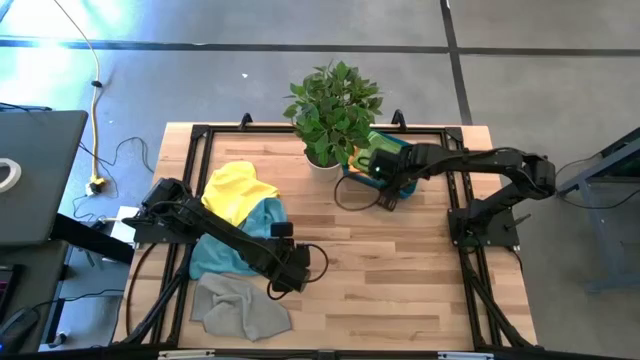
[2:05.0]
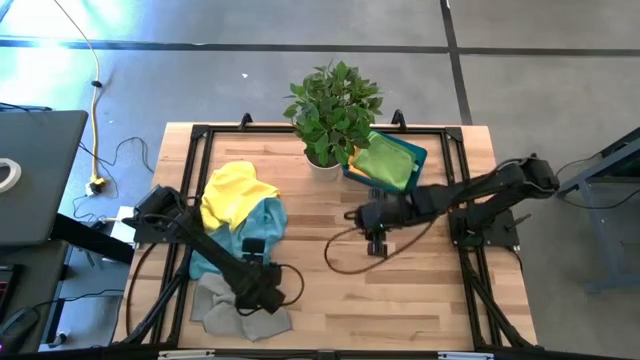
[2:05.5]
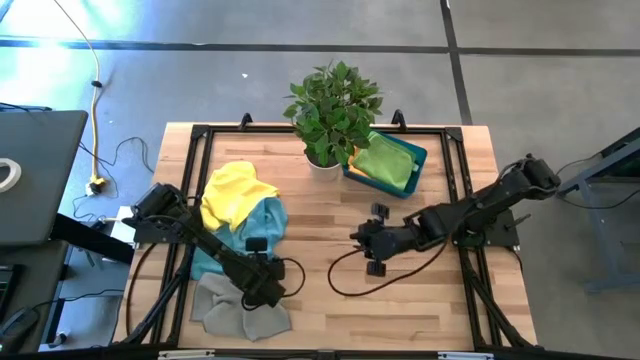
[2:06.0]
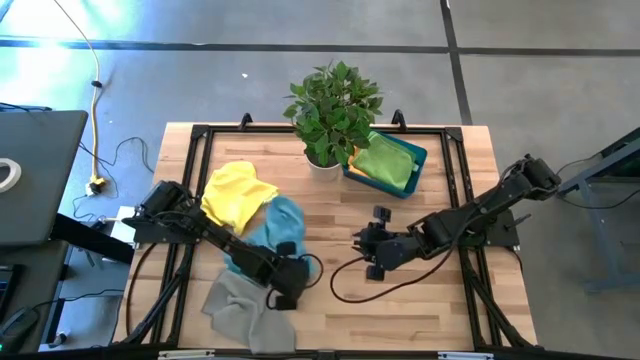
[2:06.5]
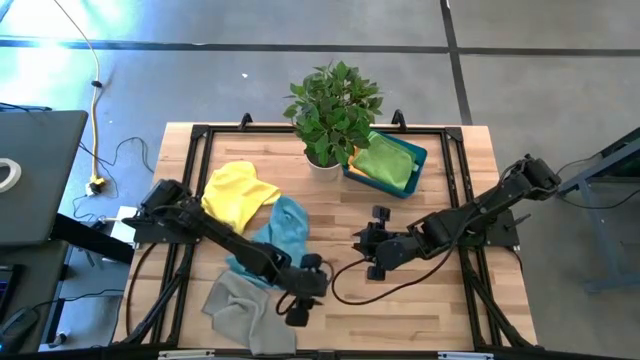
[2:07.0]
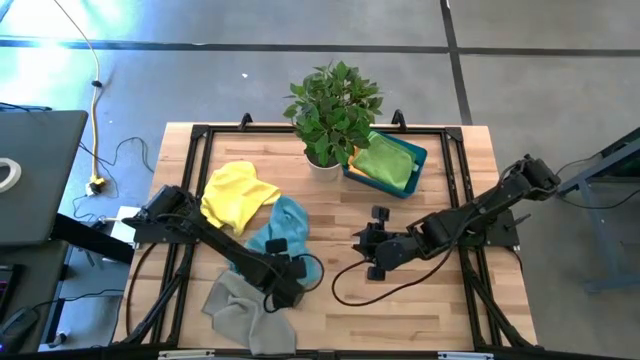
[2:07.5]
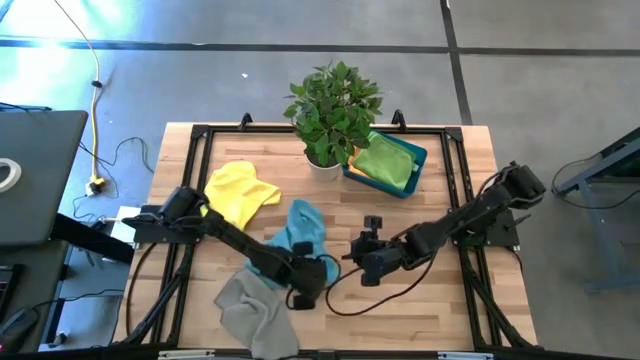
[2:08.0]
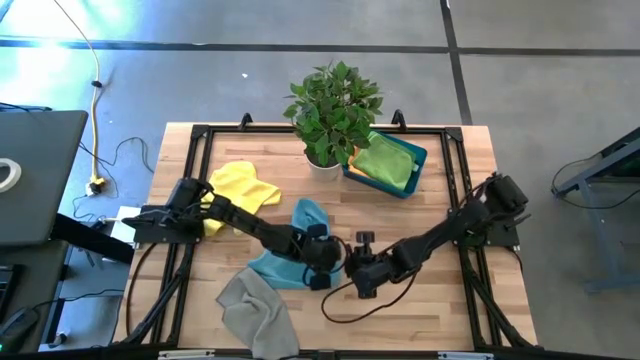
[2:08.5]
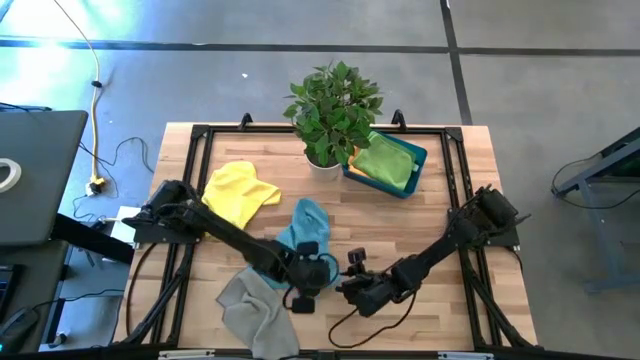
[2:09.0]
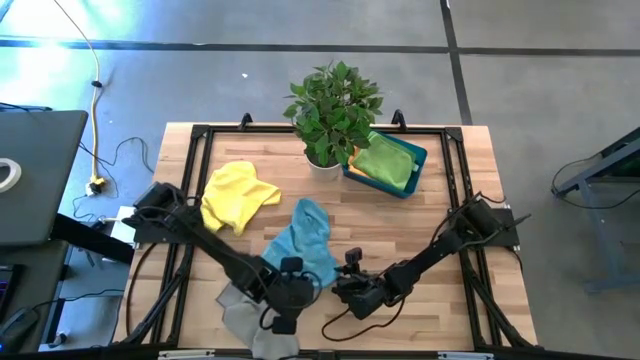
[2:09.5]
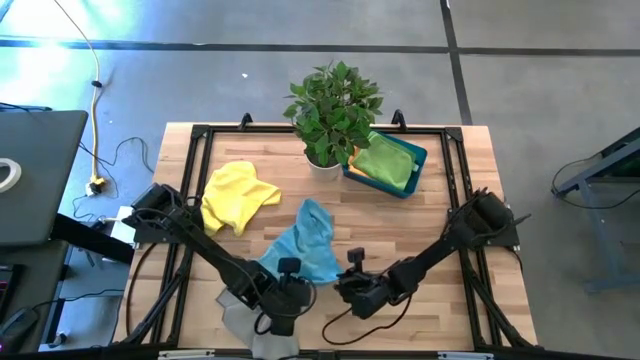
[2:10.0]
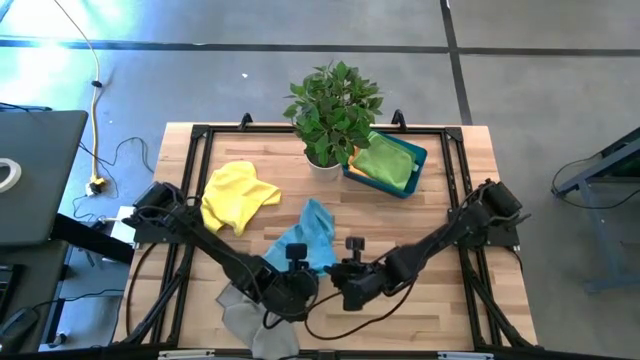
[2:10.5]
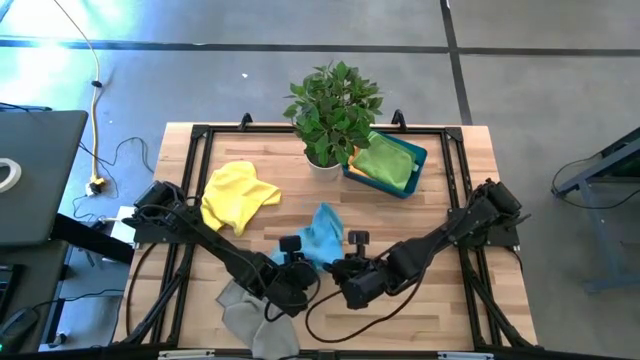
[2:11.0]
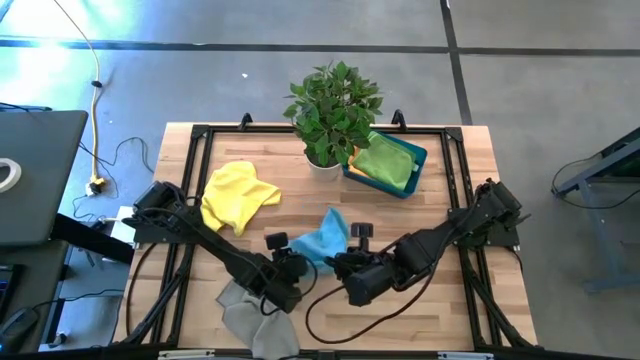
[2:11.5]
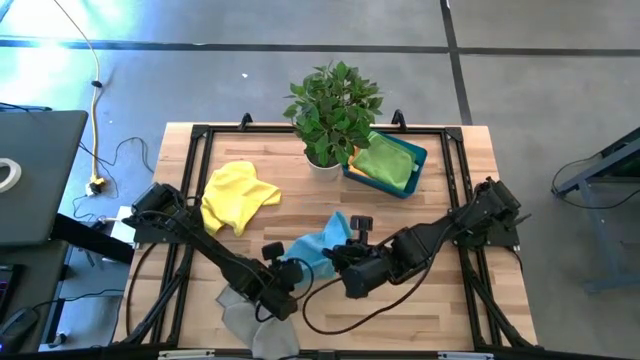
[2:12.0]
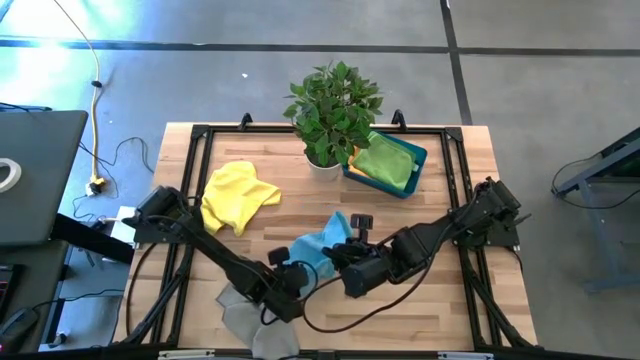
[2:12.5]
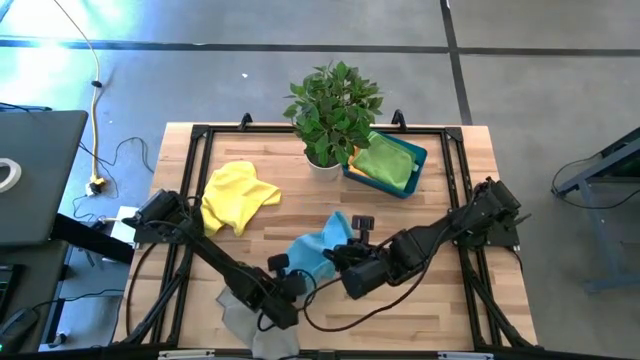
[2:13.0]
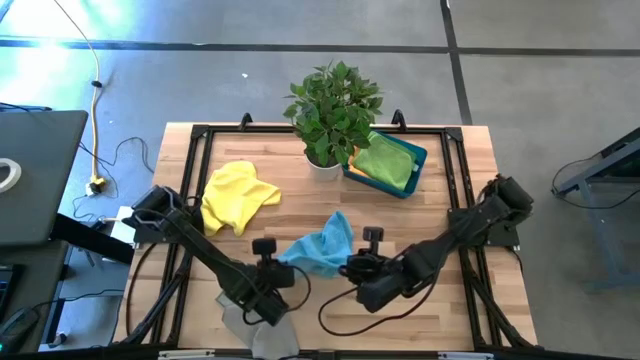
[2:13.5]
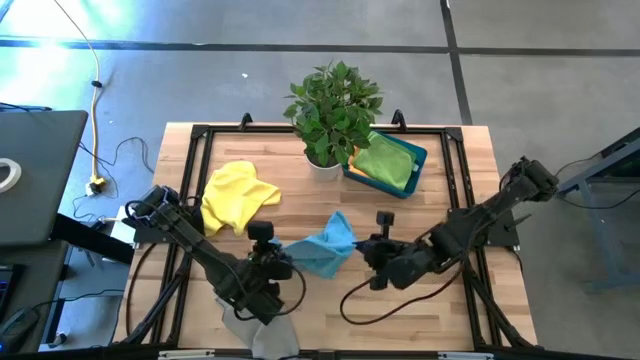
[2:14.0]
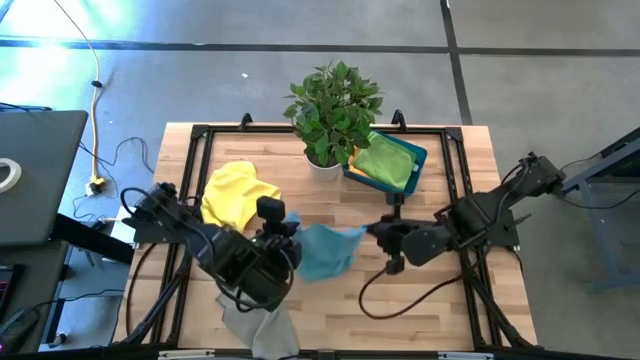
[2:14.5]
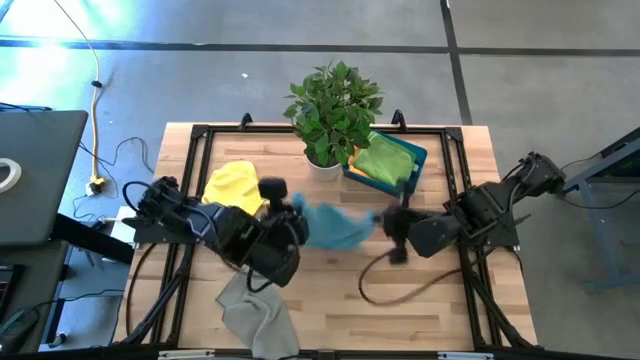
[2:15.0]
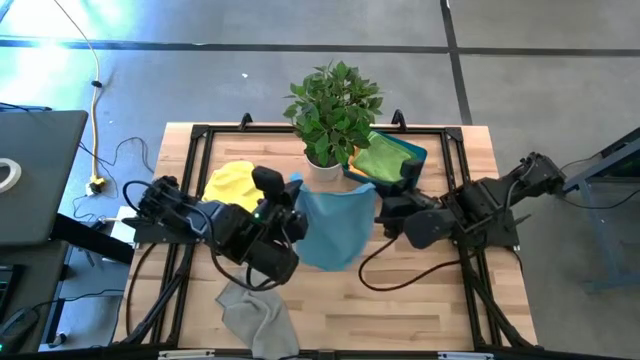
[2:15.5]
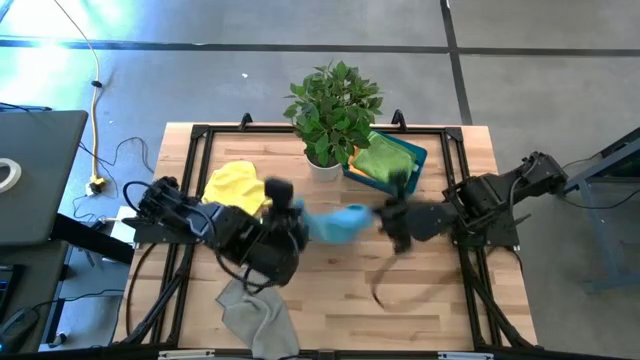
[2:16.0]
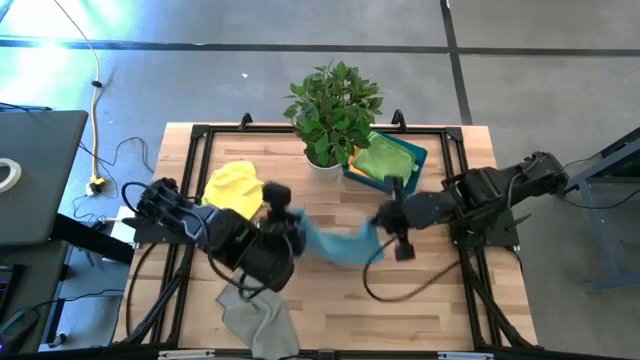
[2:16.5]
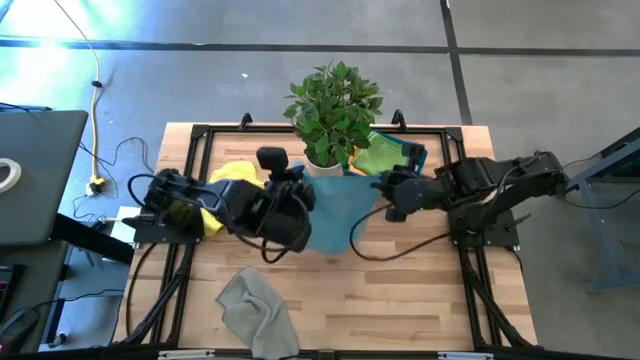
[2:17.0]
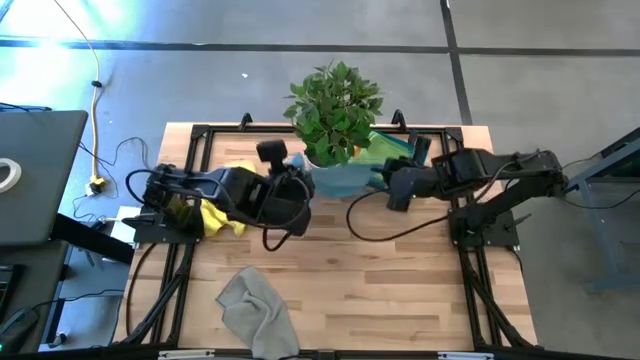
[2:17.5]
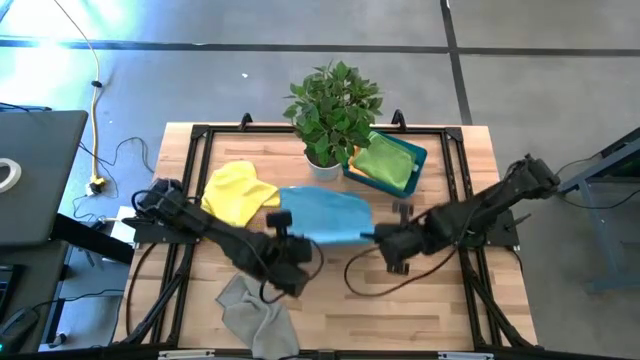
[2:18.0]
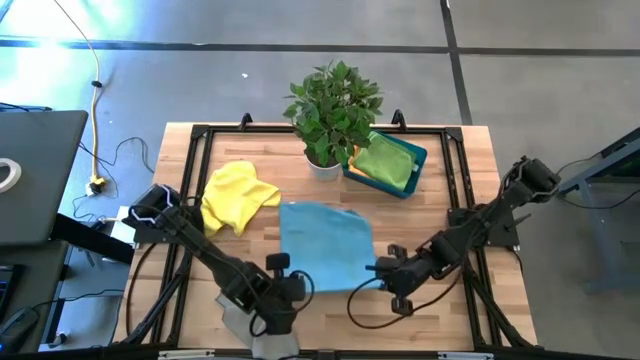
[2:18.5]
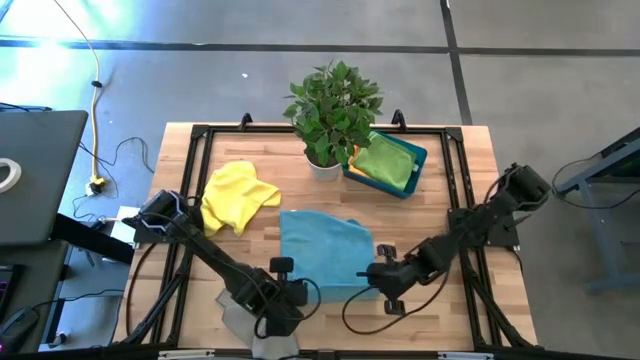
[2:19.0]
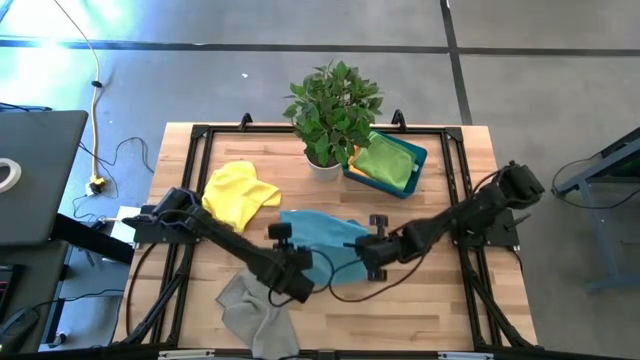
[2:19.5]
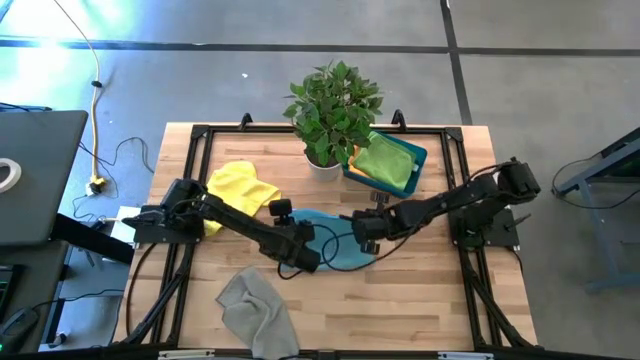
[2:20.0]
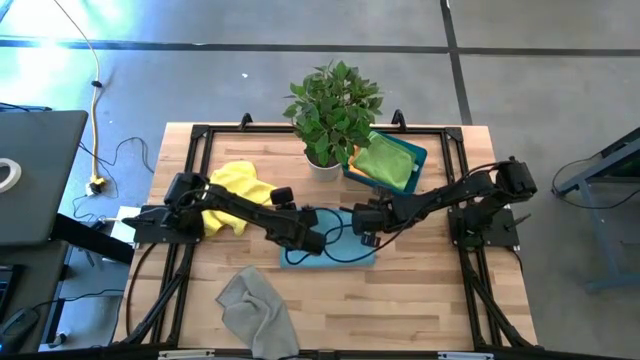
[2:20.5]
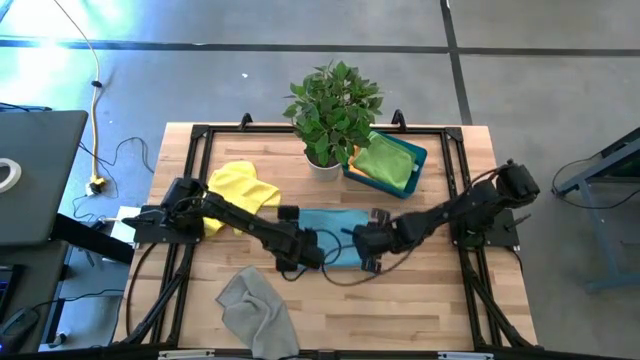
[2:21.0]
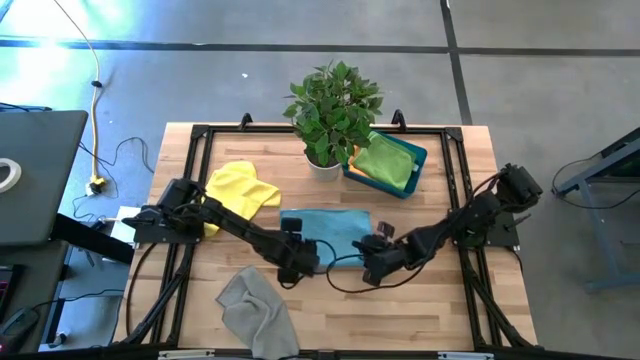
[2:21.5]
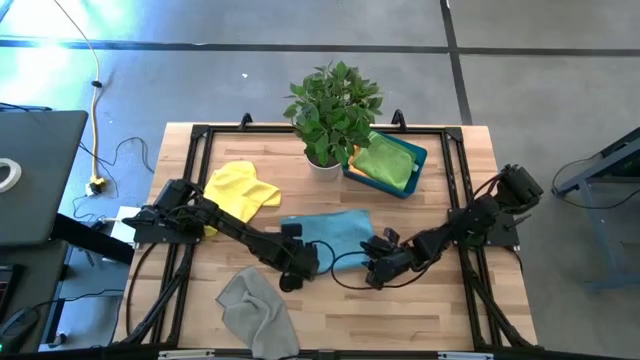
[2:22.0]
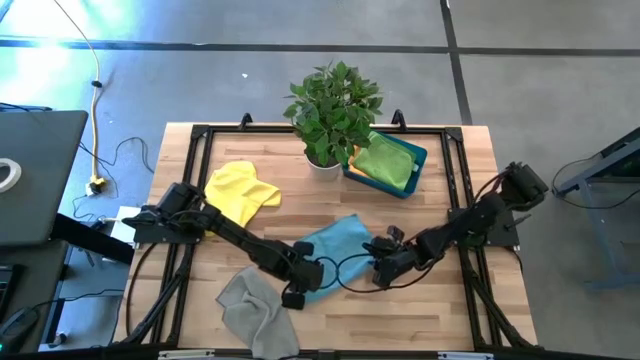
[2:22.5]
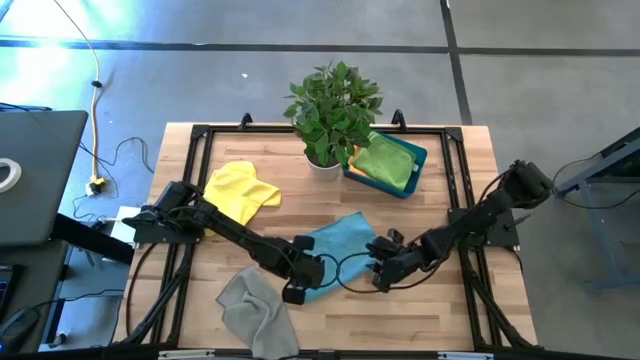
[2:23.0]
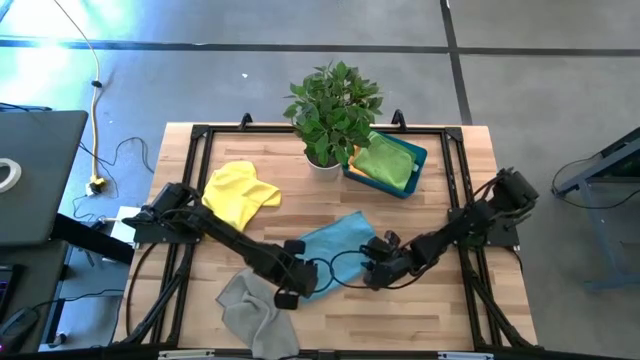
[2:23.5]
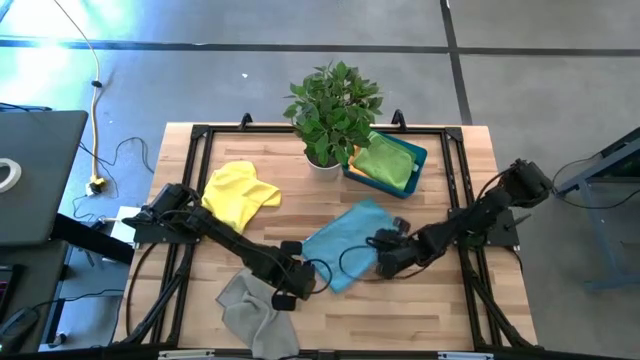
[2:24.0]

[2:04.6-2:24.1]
Task: Fold microfiber towels
Fold the blue towel

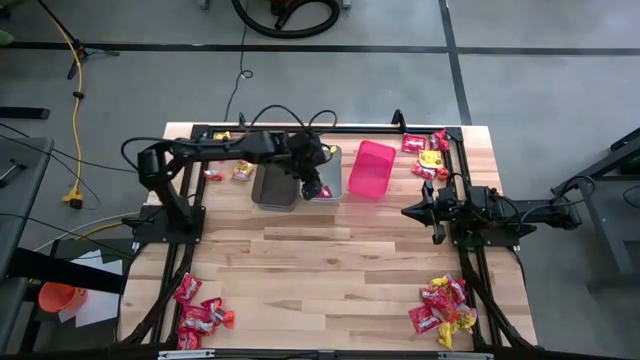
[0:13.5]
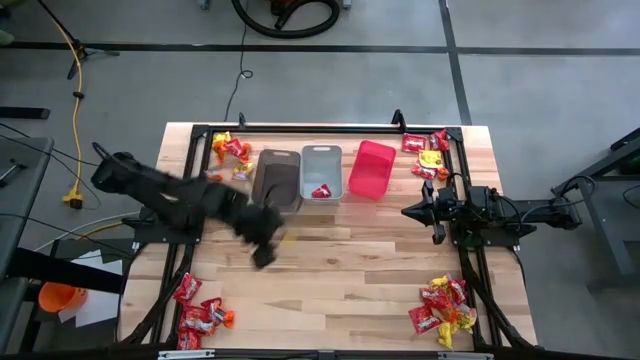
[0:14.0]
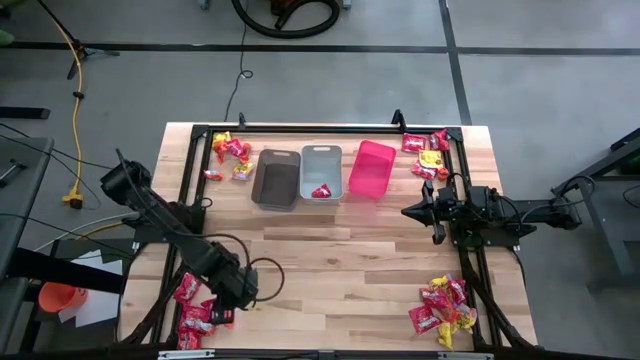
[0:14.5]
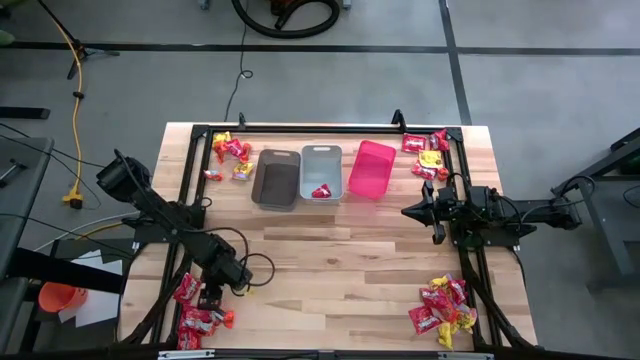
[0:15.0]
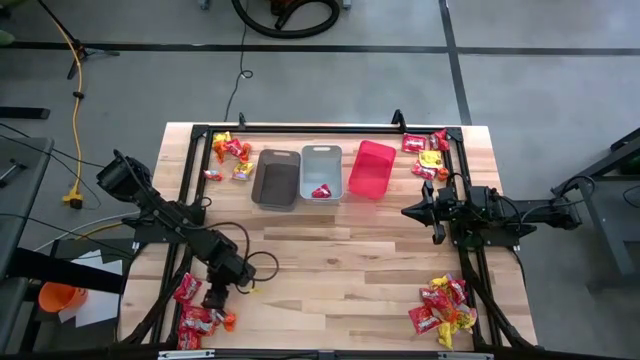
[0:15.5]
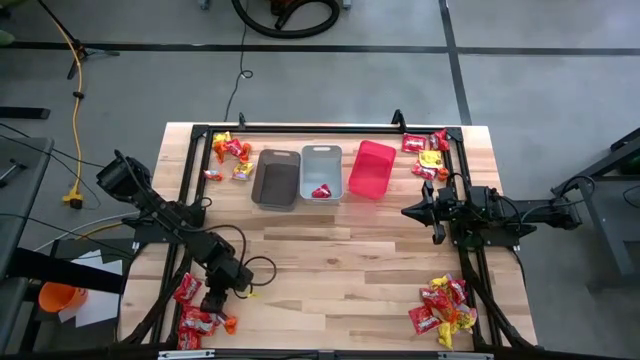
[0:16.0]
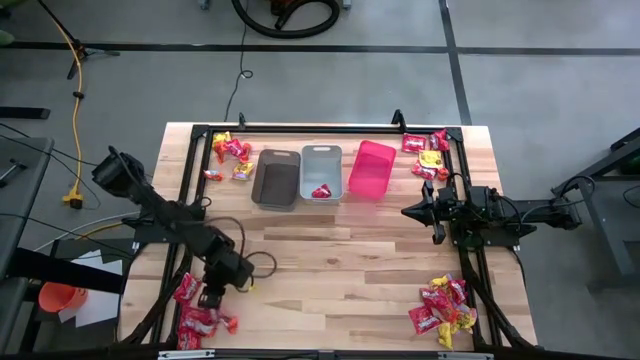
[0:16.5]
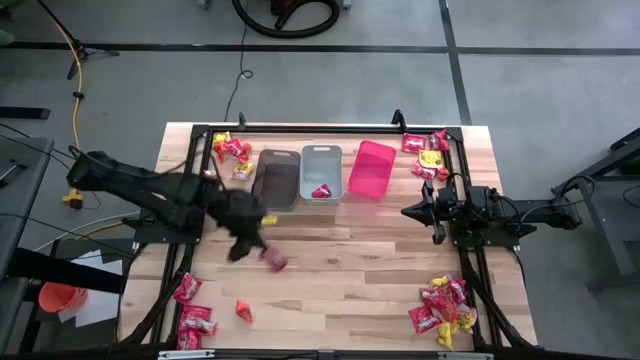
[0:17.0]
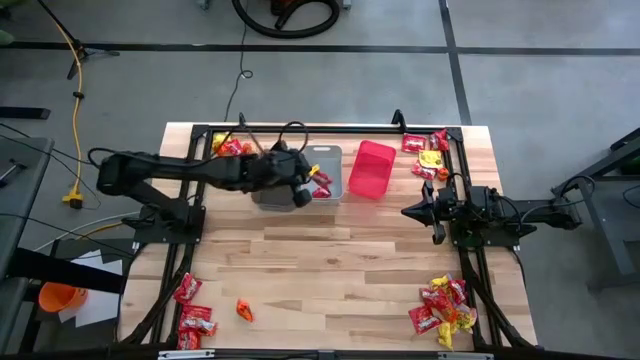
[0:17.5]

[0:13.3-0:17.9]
Task: Sort candy
Put the bottom left red candy into the gray bin
